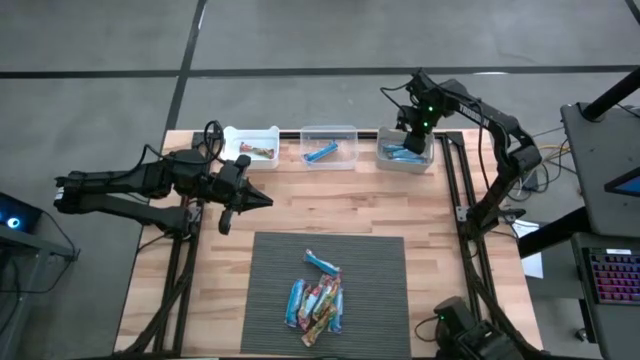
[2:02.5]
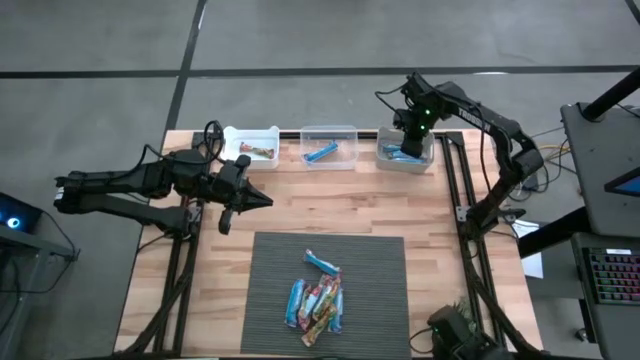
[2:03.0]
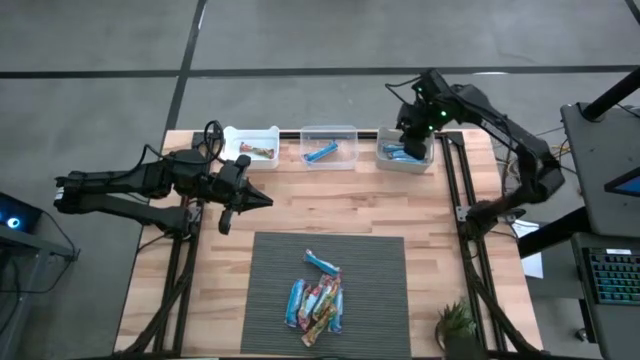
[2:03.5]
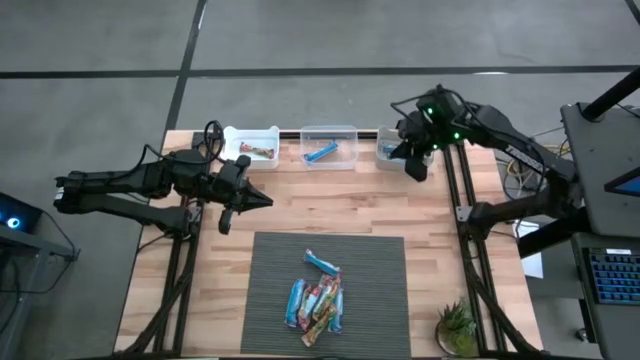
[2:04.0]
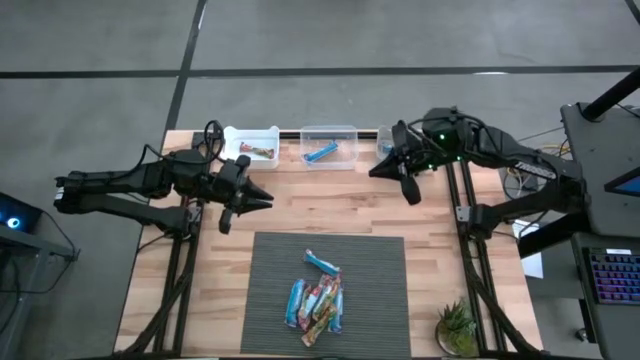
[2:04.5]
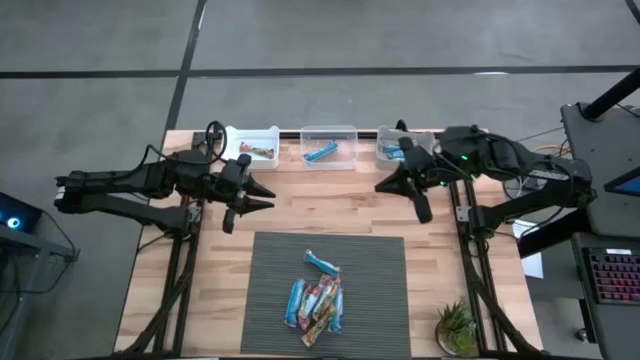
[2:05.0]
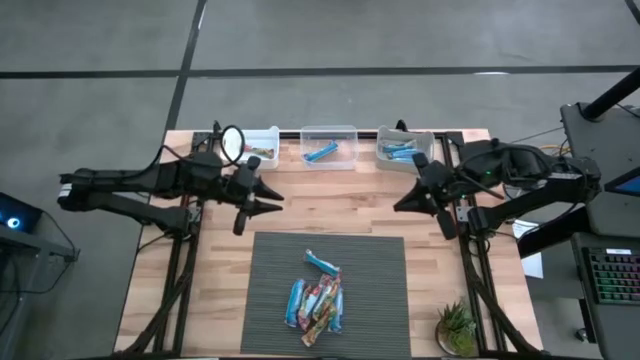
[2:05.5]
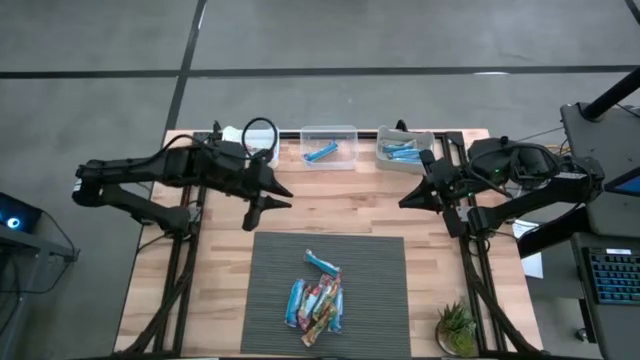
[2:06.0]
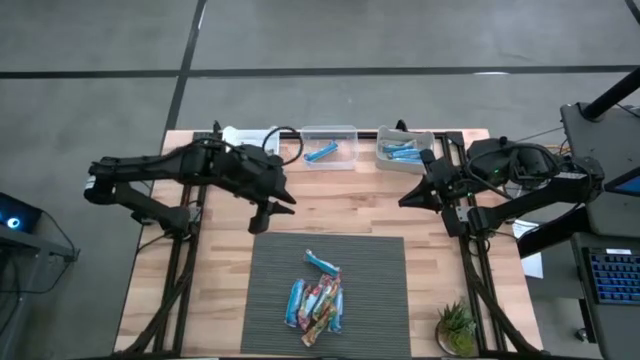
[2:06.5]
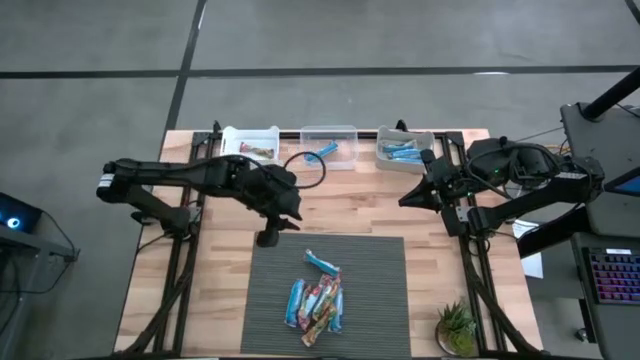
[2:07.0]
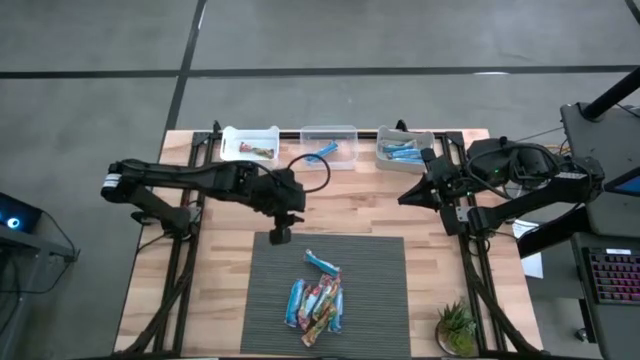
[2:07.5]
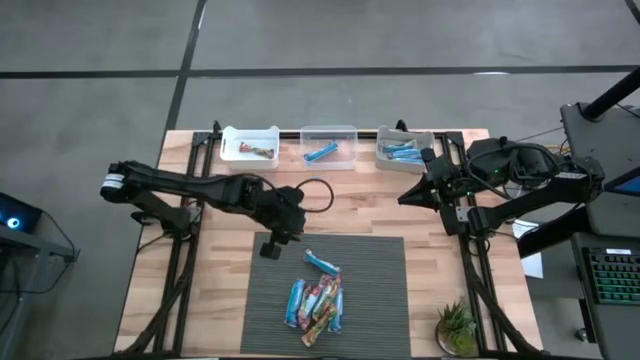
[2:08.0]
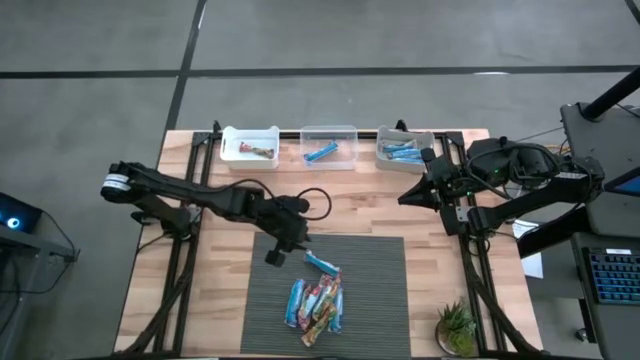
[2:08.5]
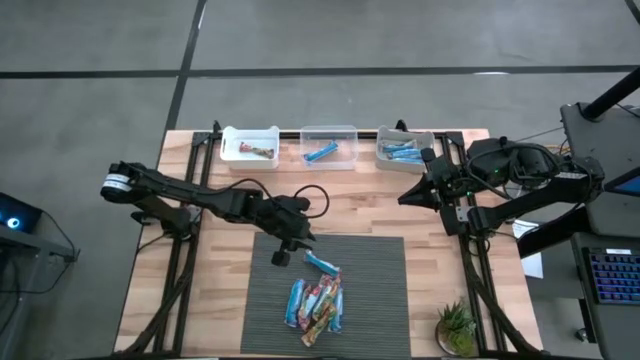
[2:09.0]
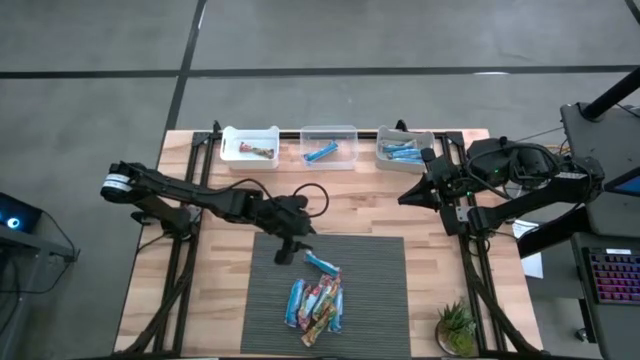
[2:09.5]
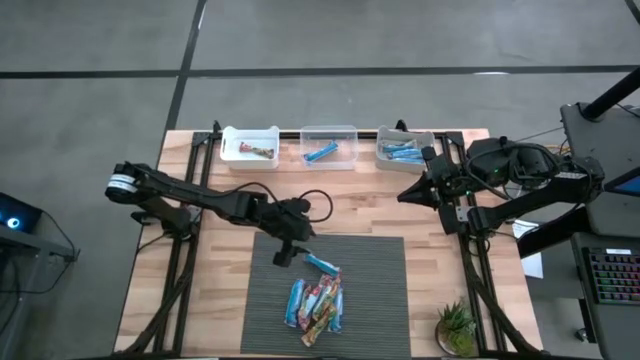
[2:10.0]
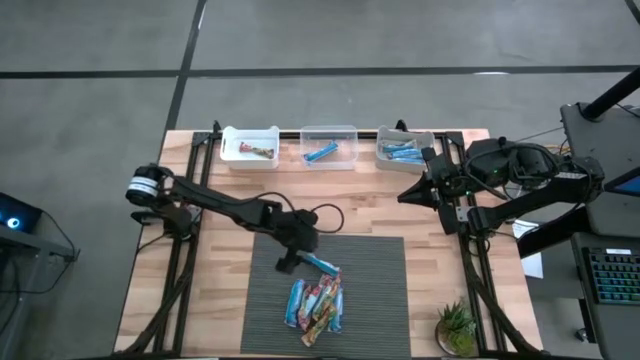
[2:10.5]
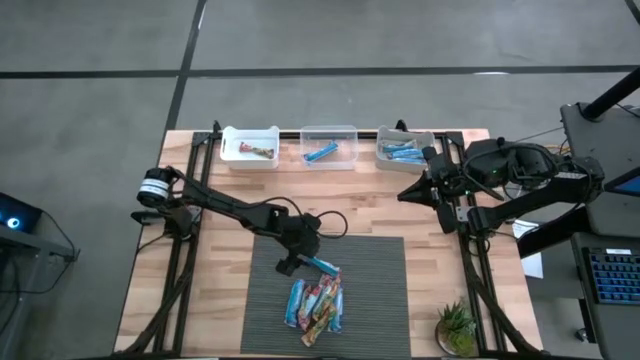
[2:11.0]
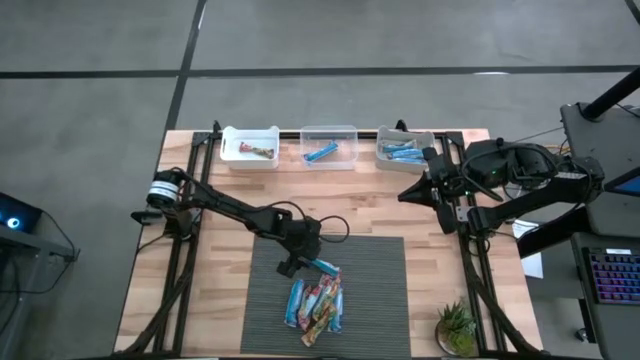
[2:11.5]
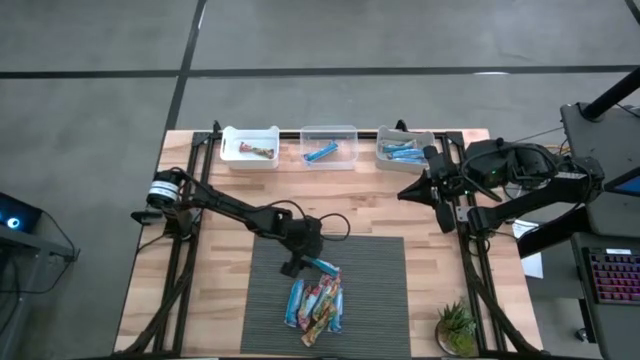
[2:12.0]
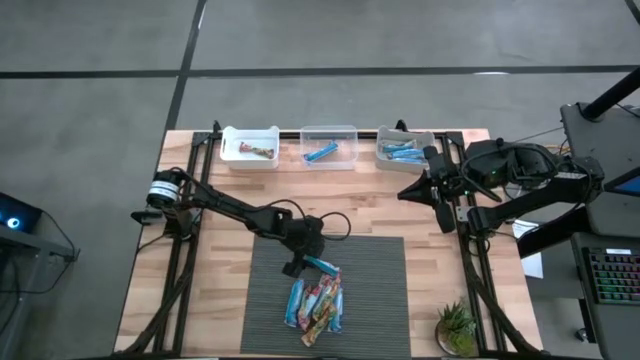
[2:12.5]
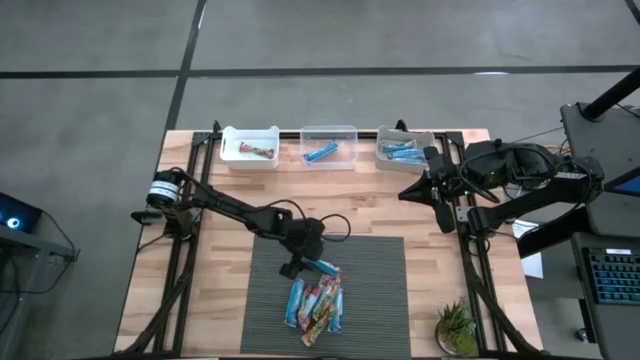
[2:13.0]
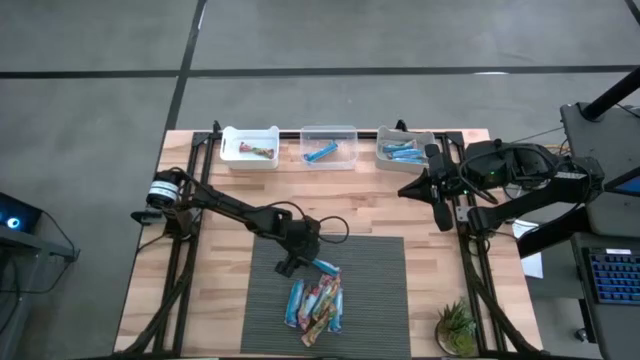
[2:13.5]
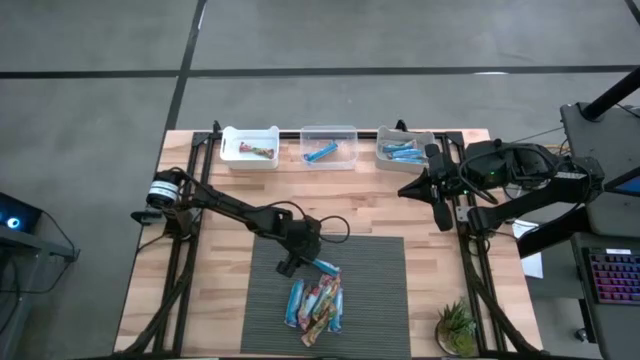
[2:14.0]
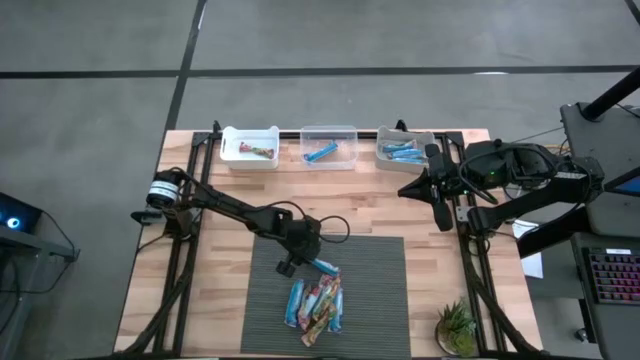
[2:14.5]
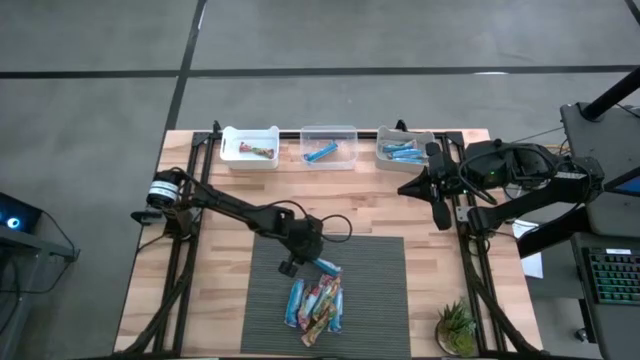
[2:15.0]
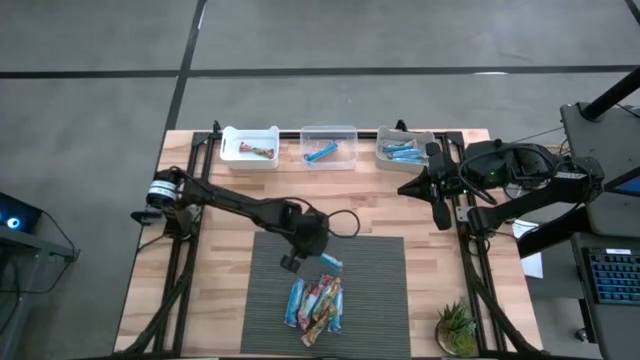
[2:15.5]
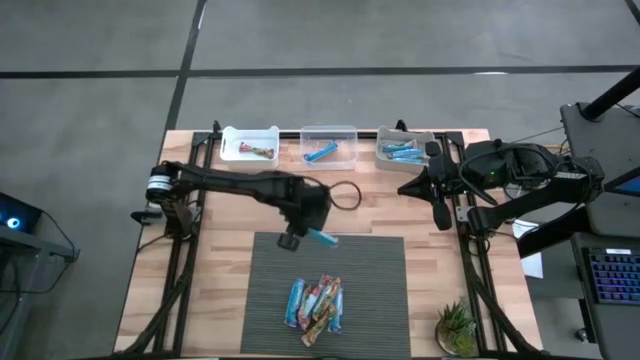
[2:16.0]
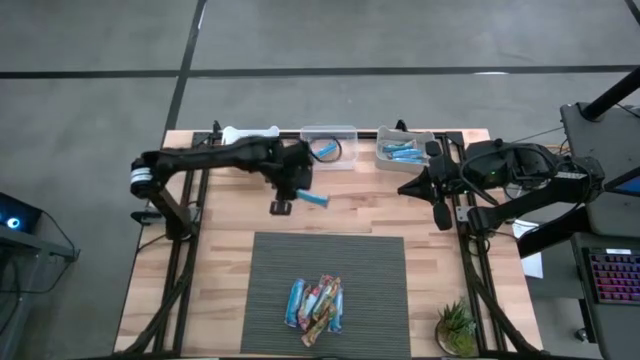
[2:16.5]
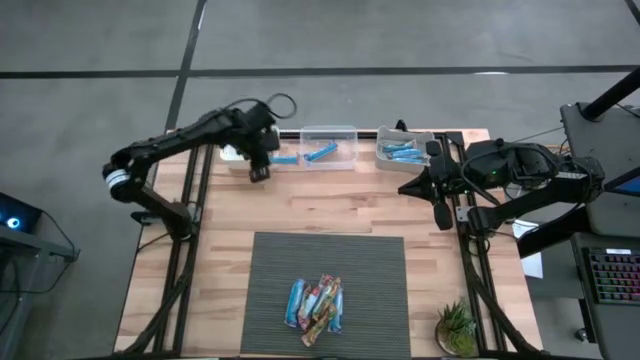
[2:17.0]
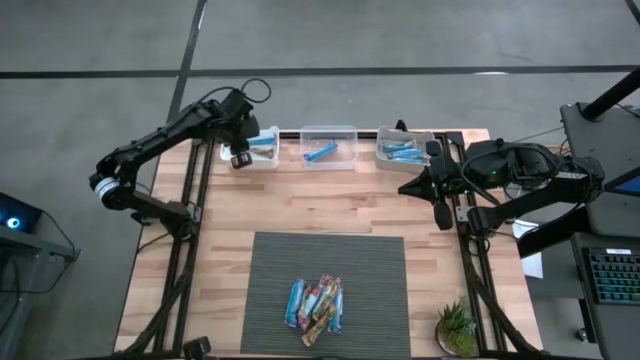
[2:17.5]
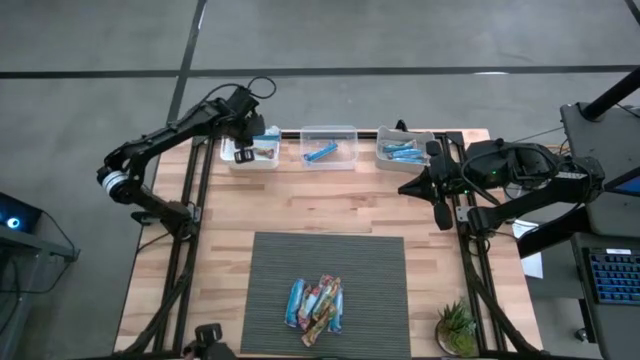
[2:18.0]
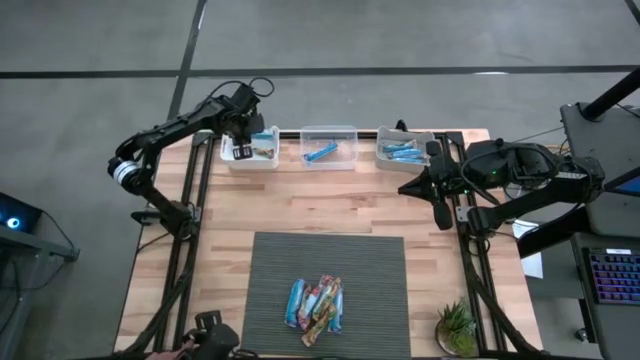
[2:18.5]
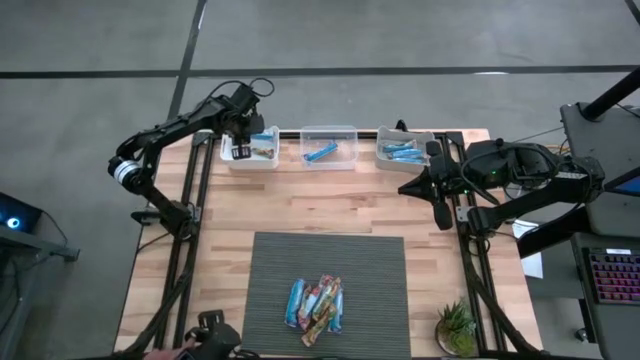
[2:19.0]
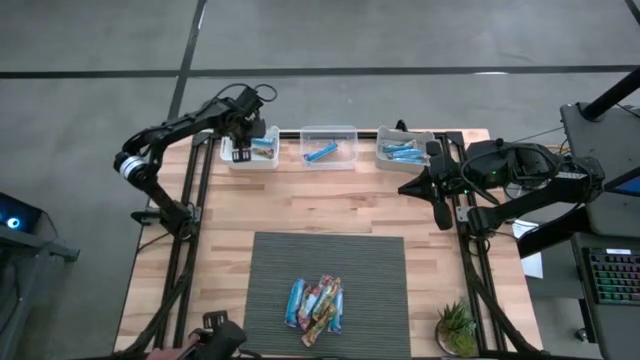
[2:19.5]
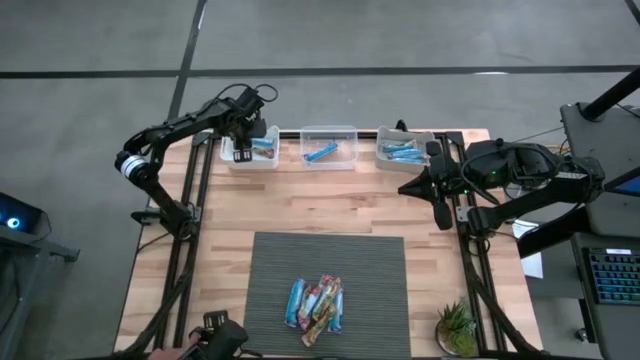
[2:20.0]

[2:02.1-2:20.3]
Task: Pick and place Granola Bars by type
Put the red granola bar into the white bin

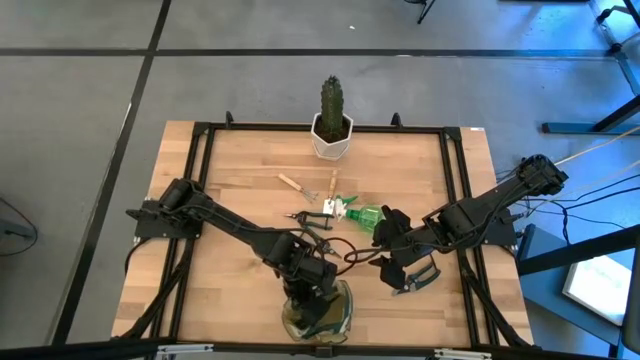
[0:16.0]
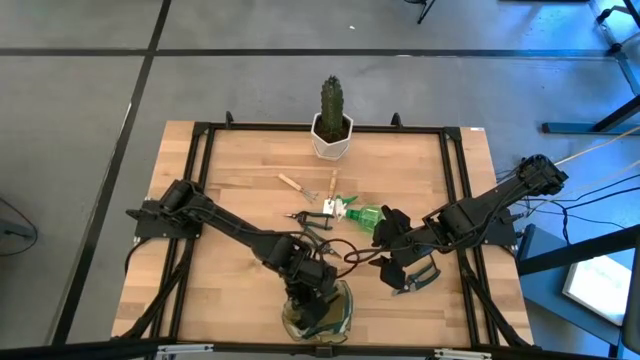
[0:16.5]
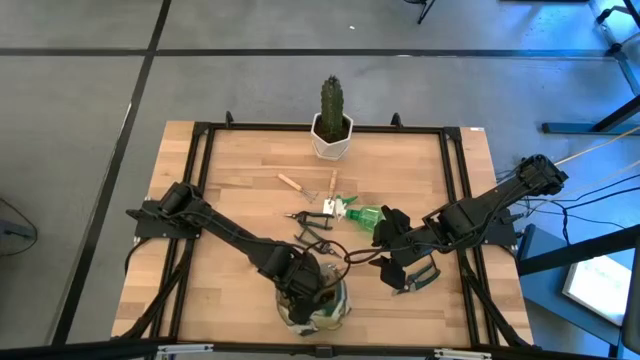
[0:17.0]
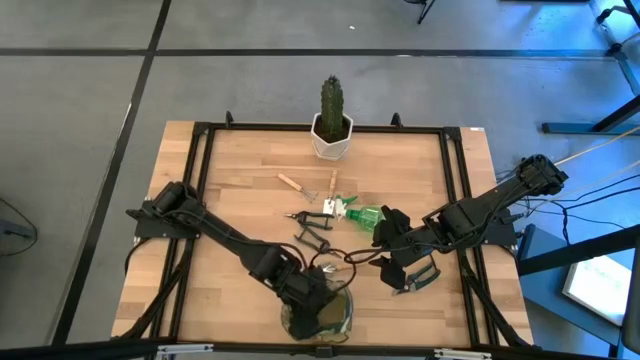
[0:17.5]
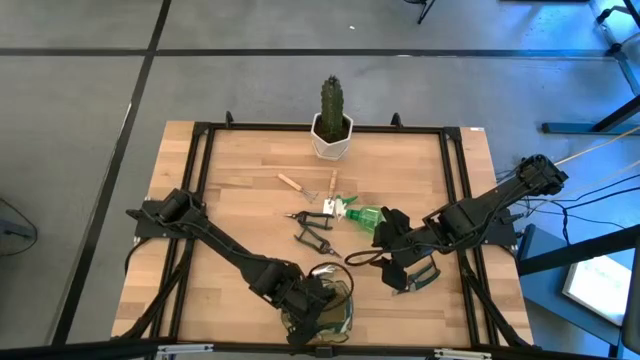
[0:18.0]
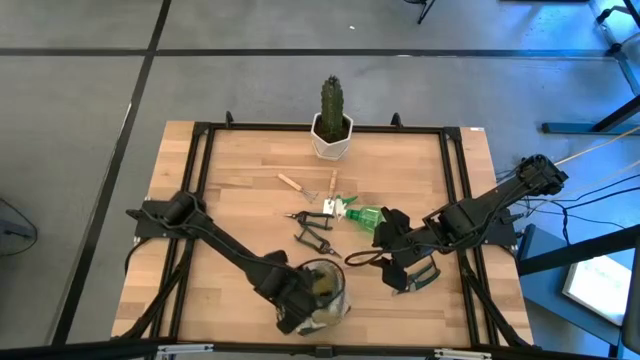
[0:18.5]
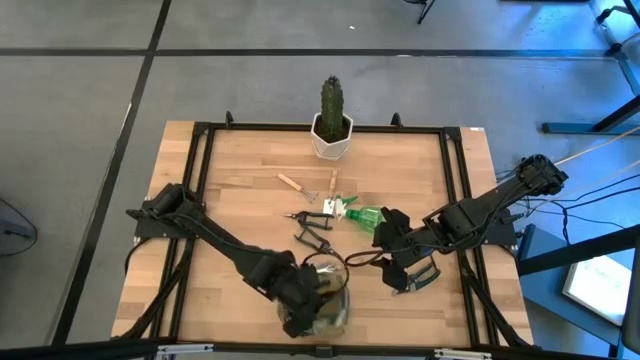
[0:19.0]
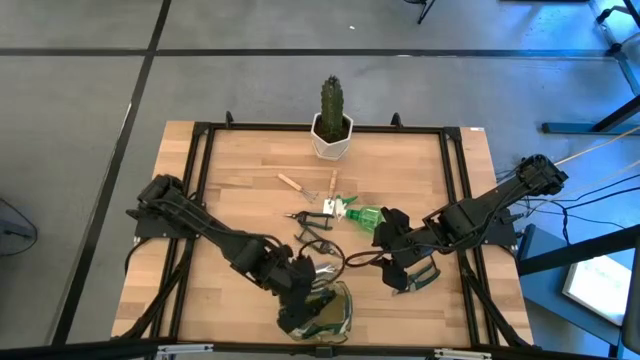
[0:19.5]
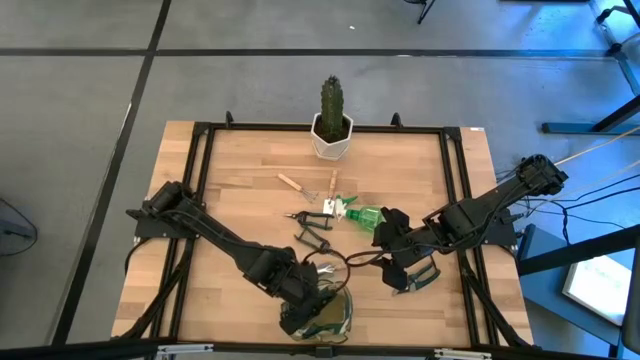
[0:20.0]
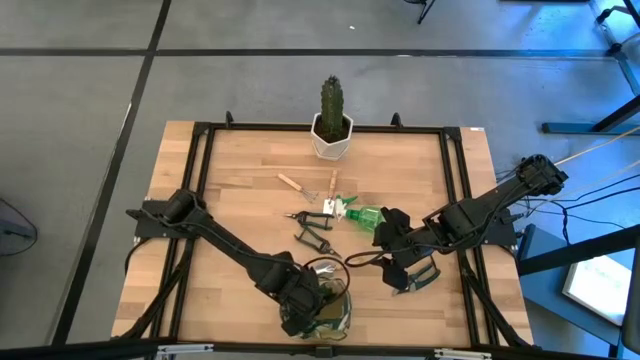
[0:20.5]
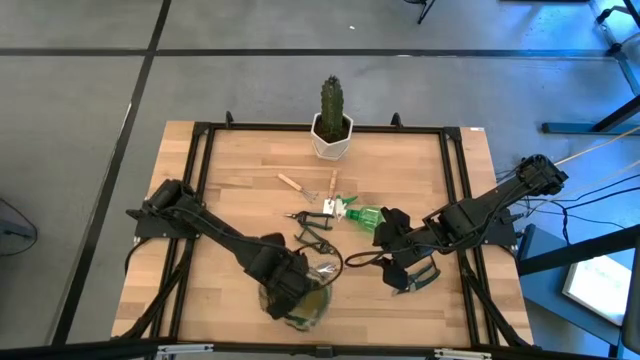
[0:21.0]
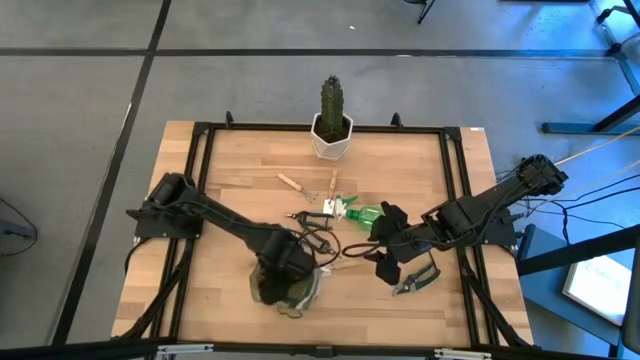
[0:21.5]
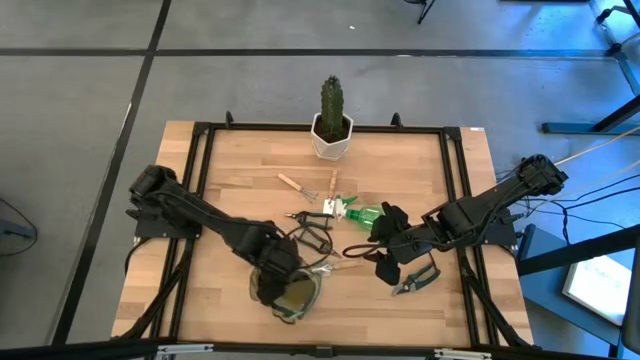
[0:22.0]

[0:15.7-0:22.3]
Task: Pick & Place Garden tools in Gardening bag
Adjust the gardening bag
